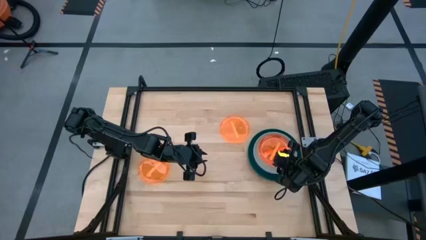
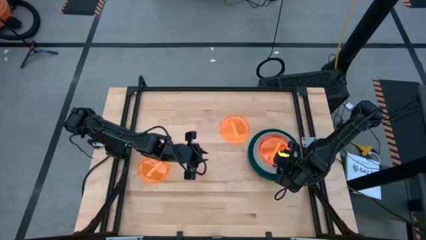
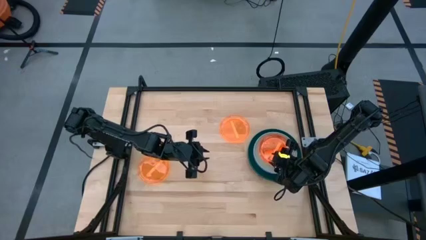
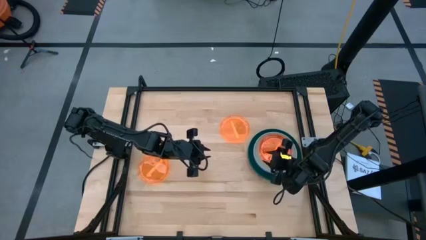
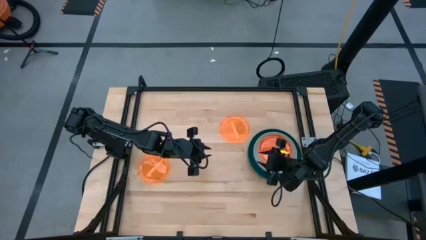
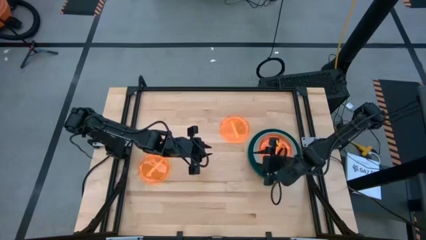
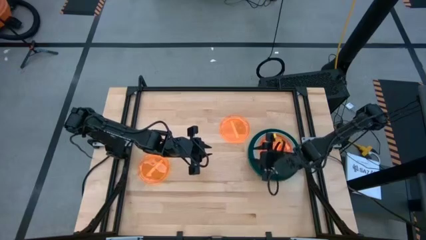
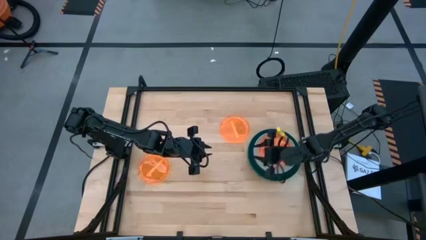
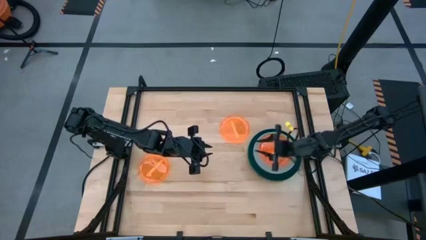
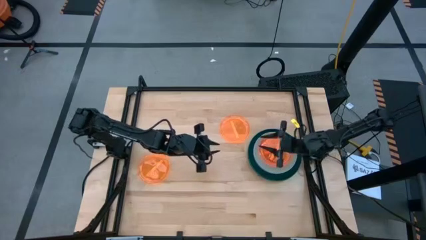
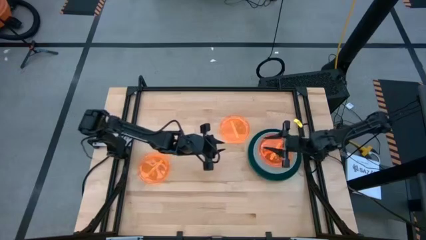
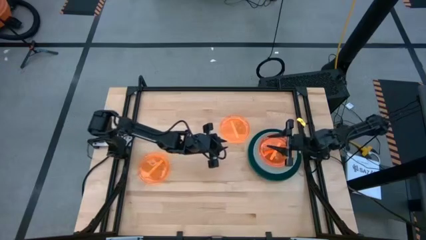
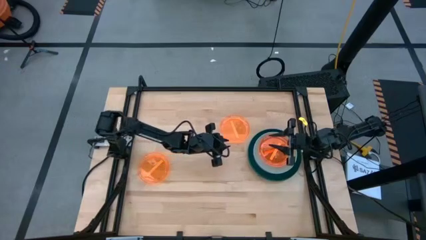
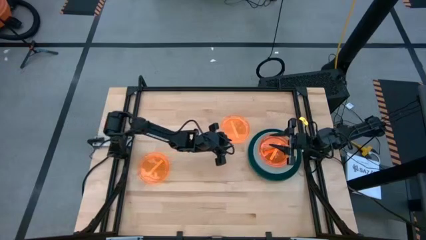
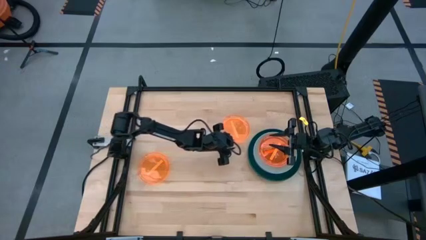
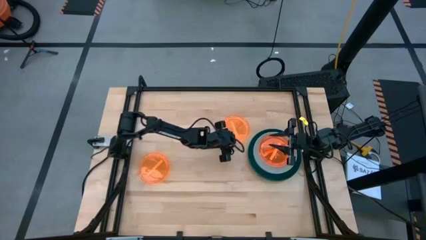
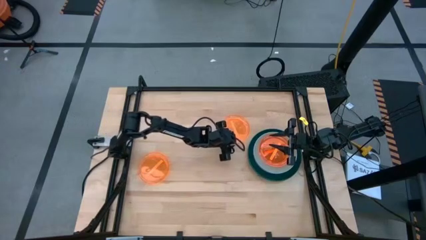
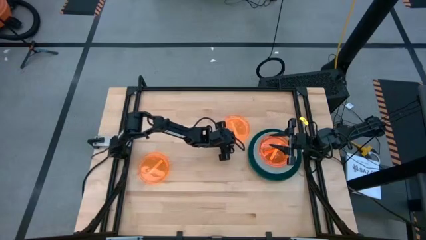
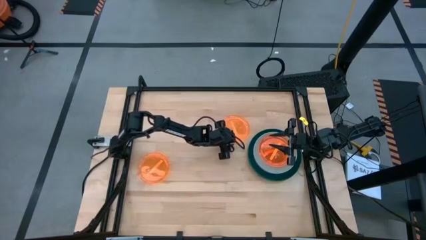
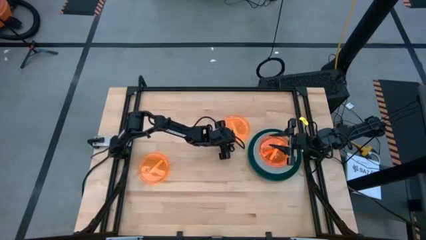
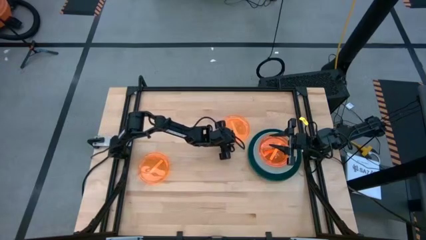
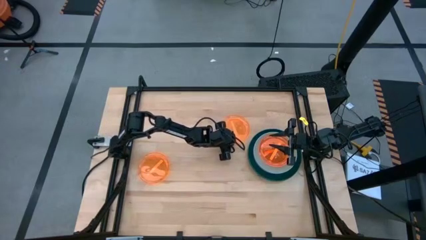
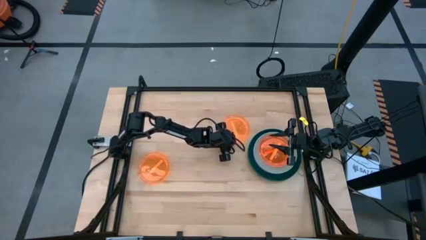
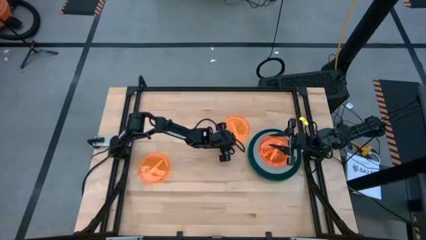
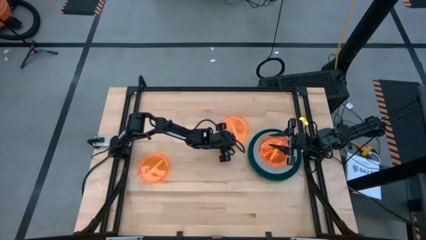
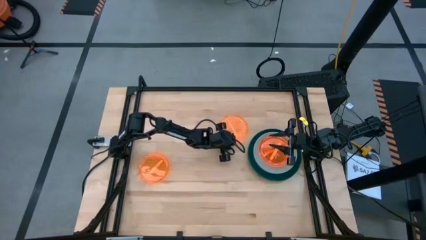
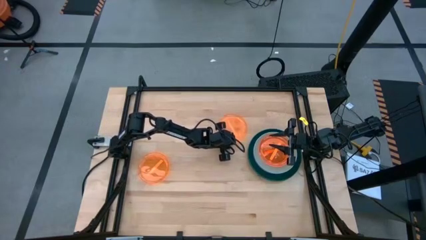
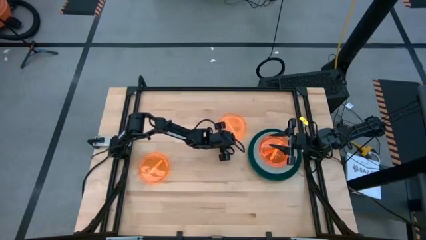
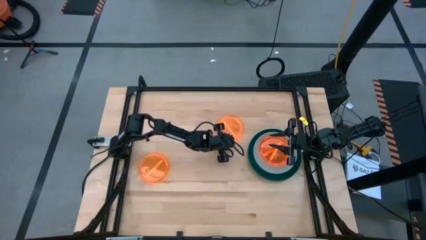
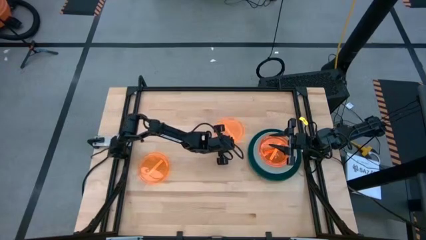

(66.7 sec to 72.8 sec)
Task: Stack plastic plates
Stack the top orange plate on top of the orange plate

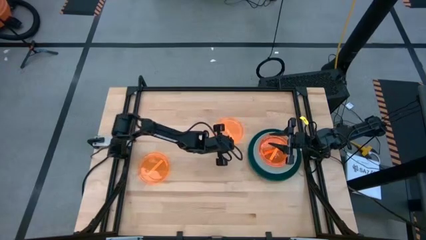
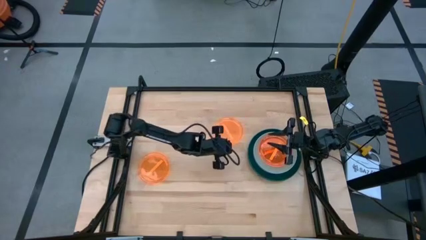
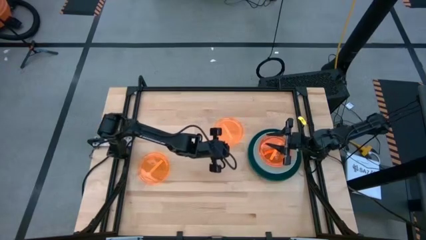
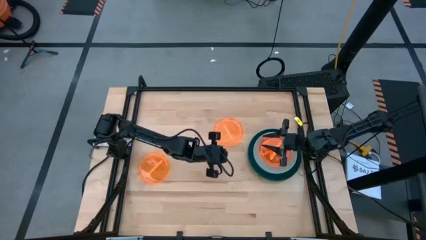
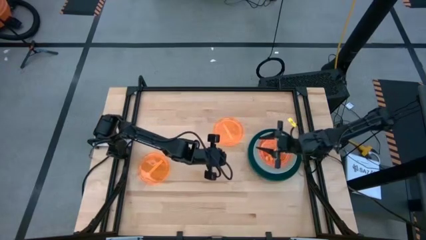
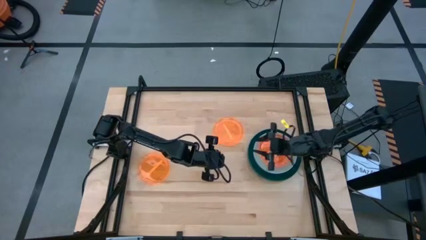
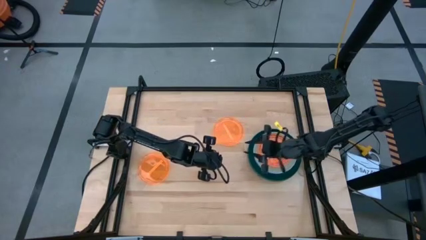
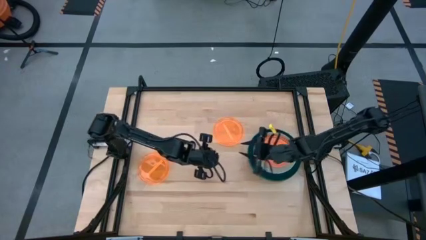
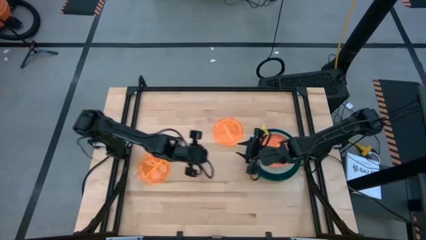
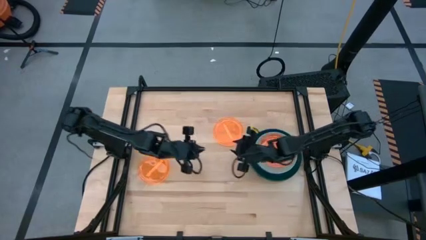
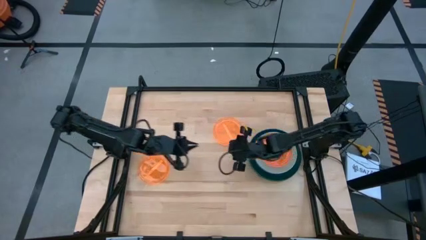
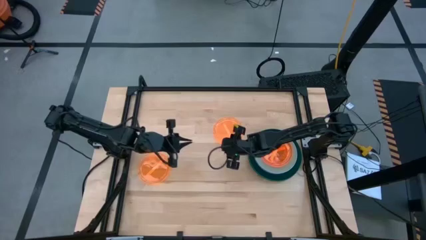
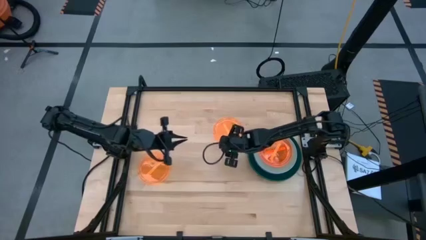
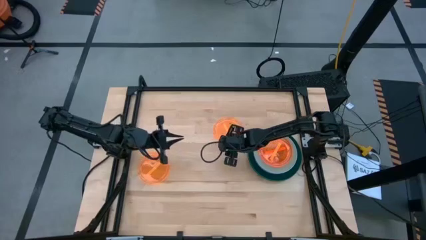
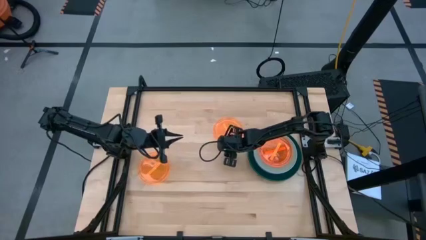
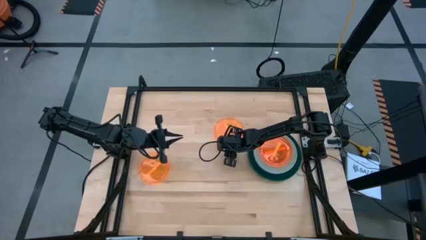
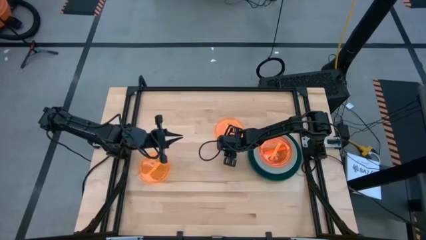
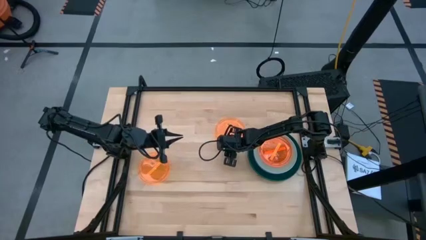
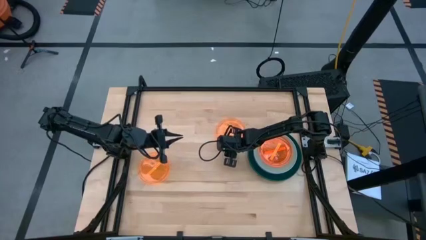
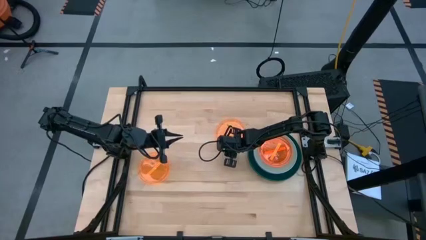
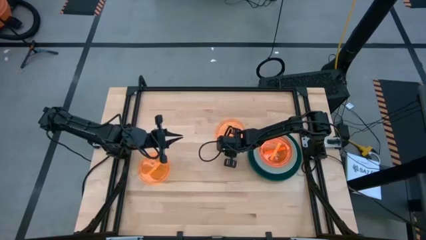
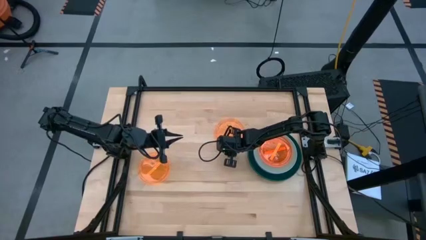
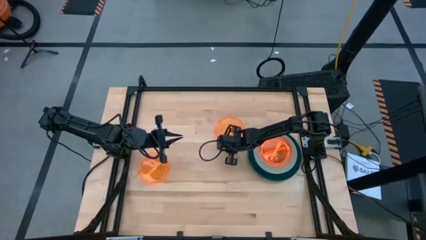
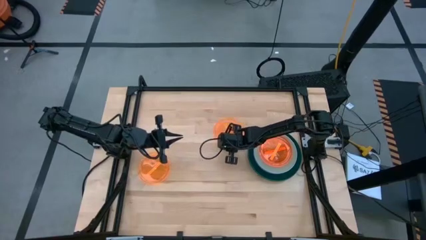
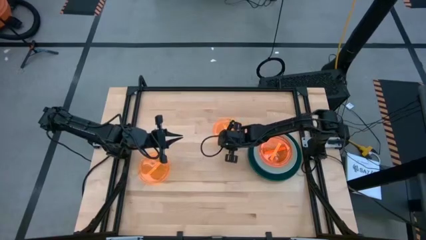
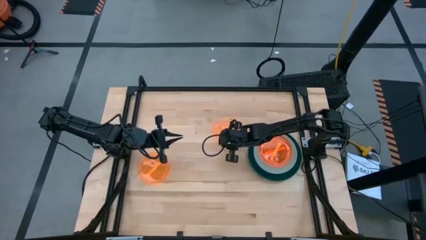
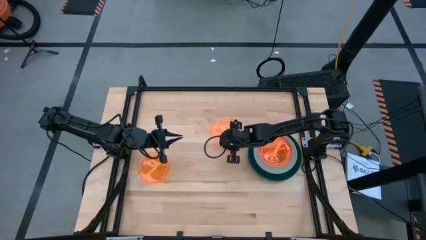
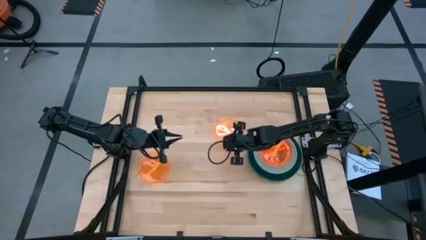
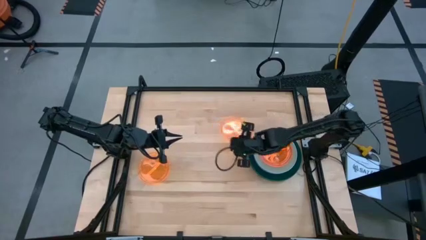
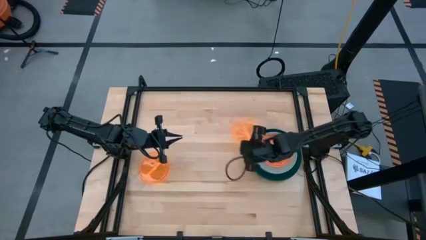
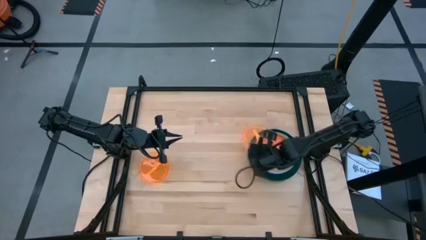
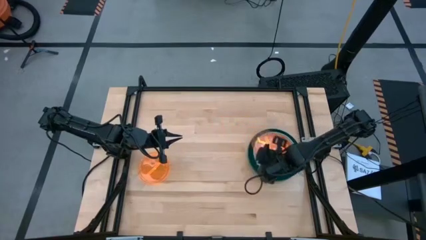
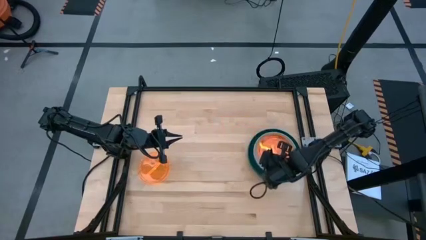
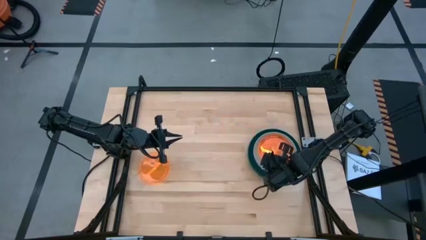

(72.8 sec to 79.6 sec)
Stack the right orange plate on top of the orange plate

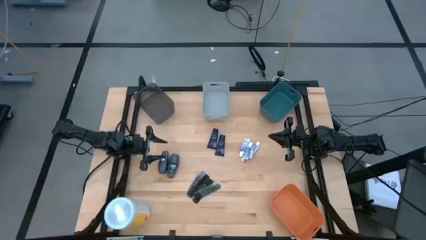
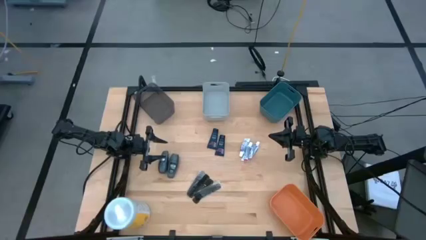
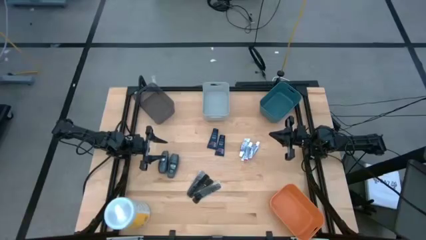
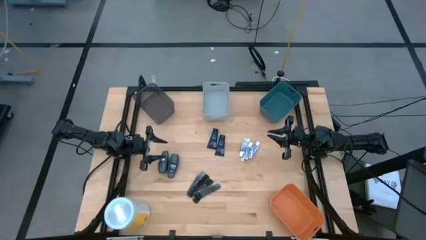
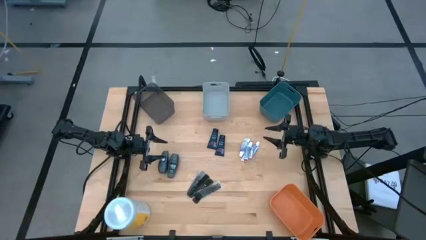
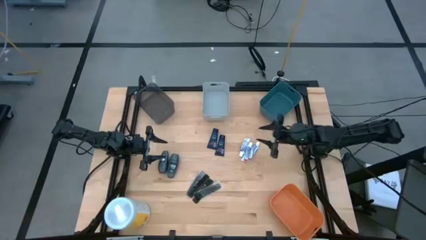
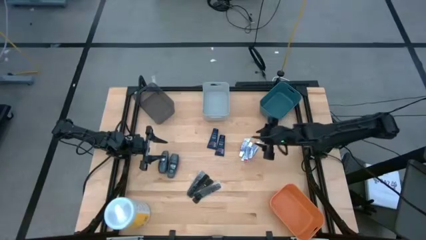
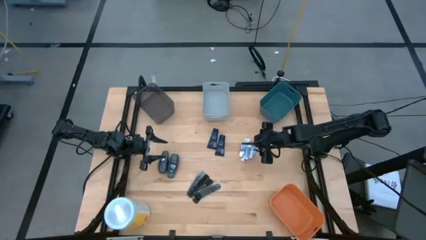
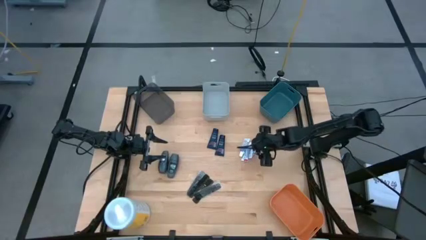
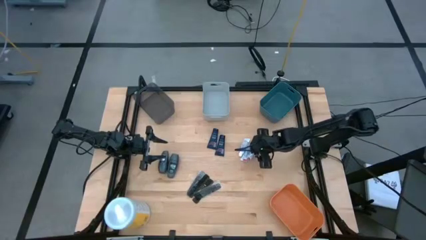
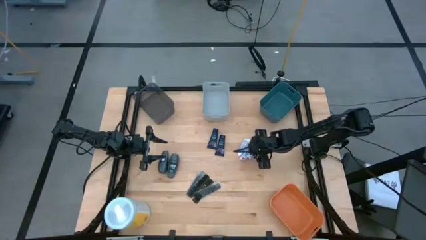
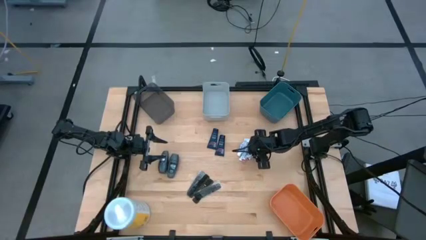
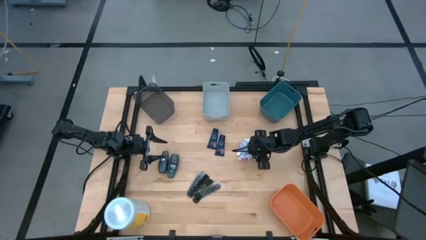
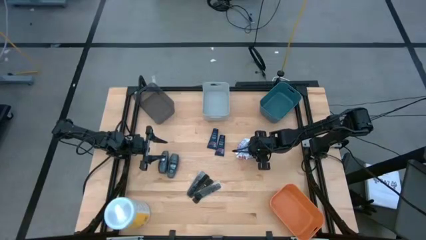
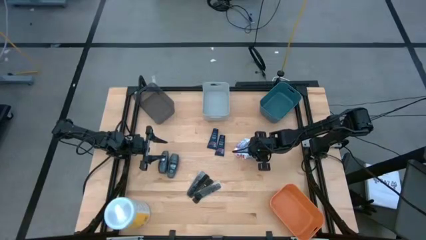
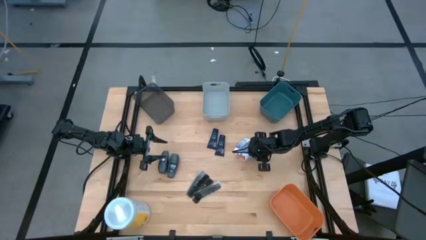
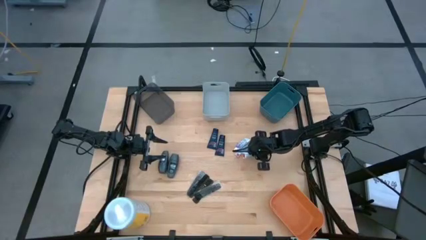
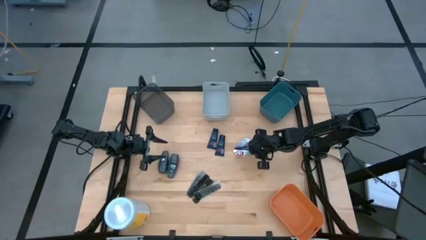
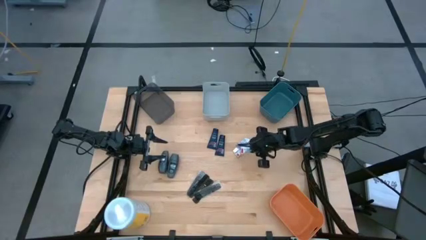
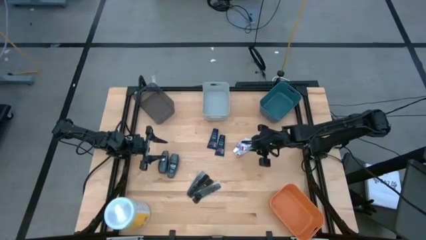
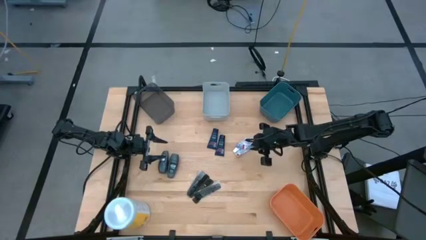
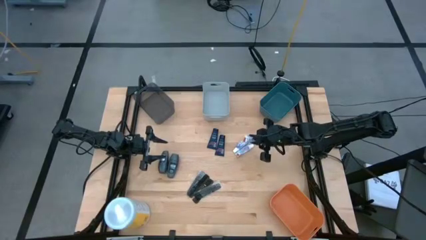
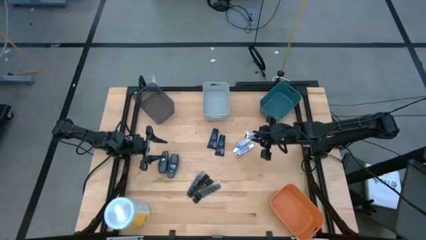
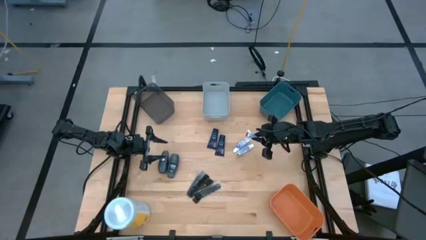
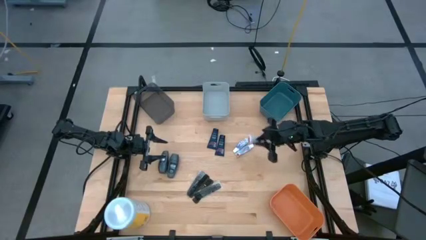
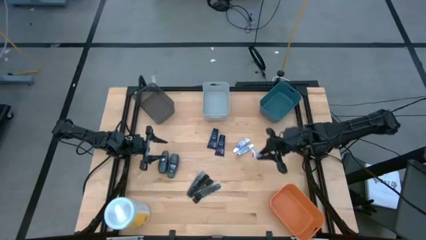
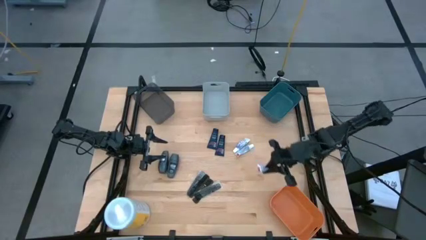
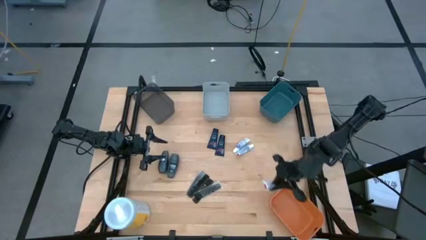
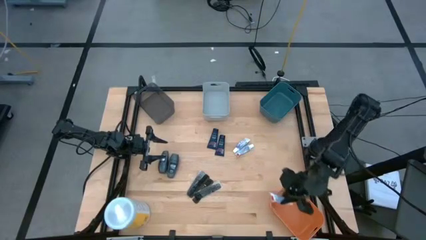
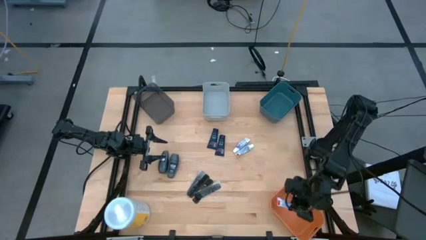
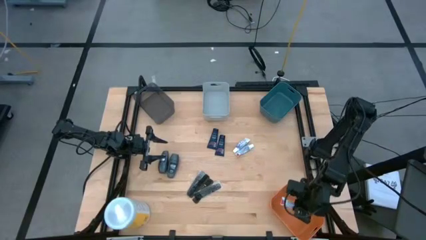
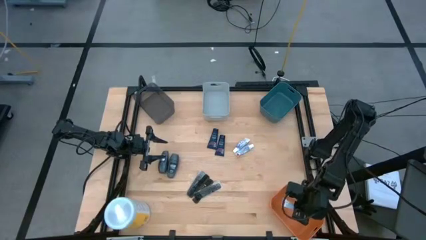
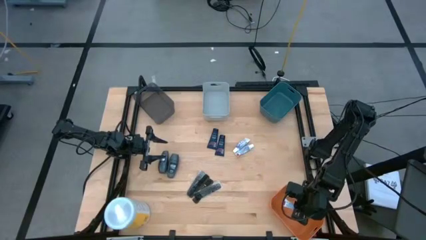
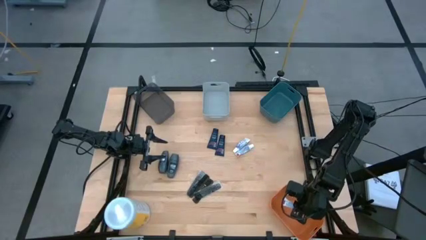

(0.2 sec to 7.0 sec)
Task: Pick & Place Travel size toiletries
Put the bottom white toothpaste into the orange bin
